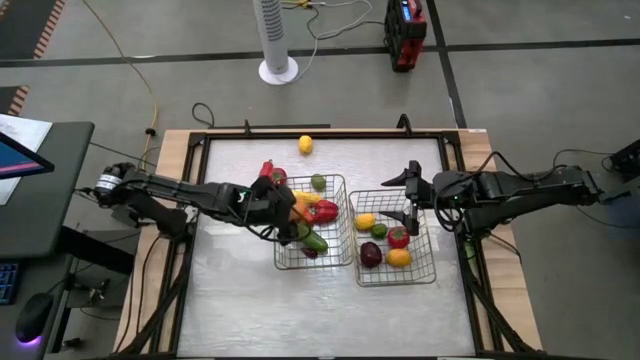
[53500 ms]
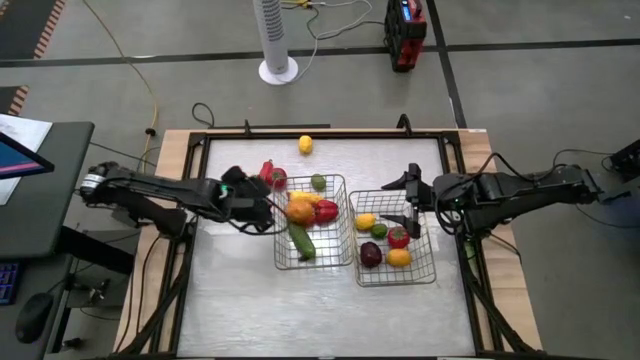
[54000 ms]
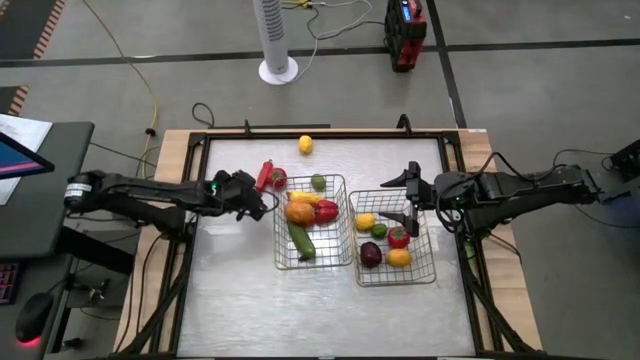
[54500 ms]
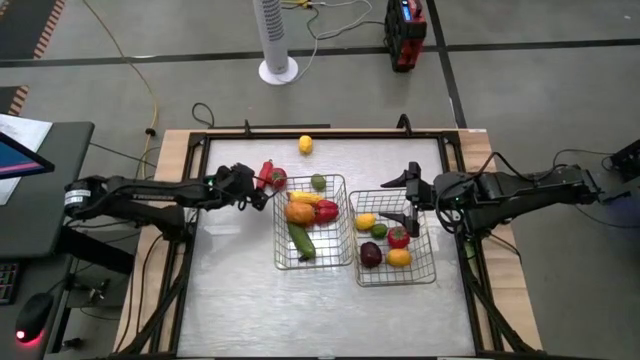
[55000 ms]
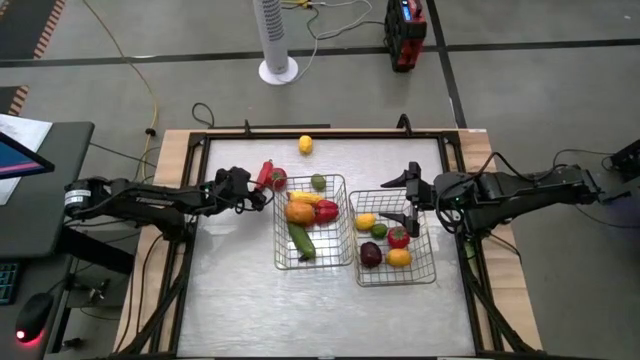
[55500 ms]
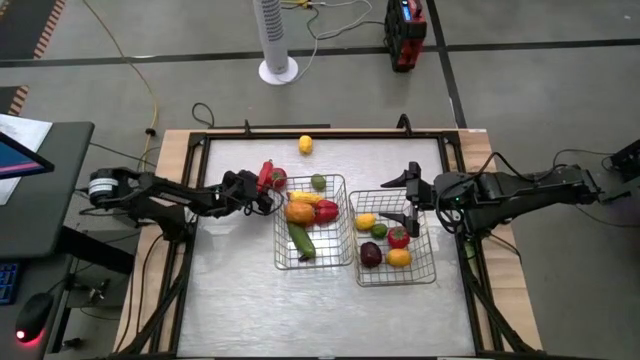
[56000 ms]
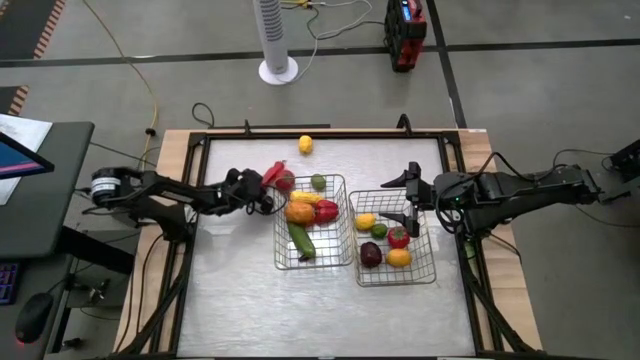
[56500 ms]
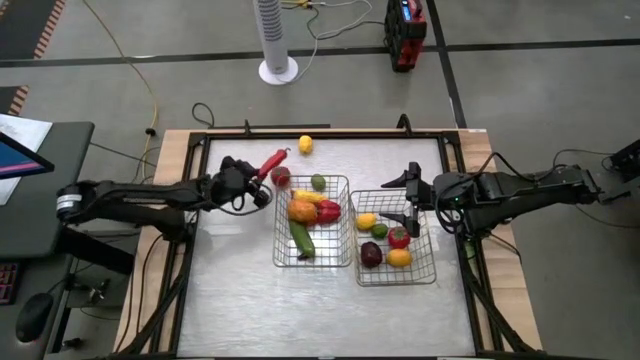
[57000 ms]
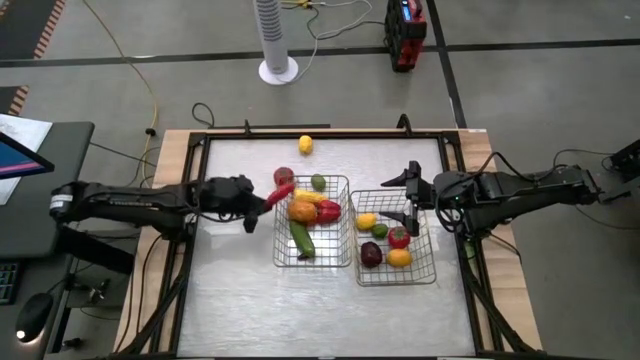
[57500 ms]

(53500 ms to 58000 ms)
Task: Sort produce into baskets
Put the red chili pepper into the left wire basket

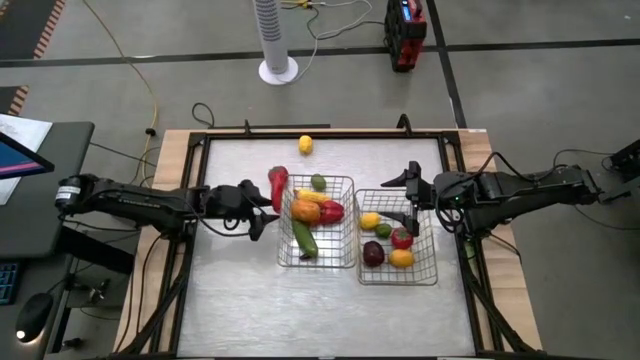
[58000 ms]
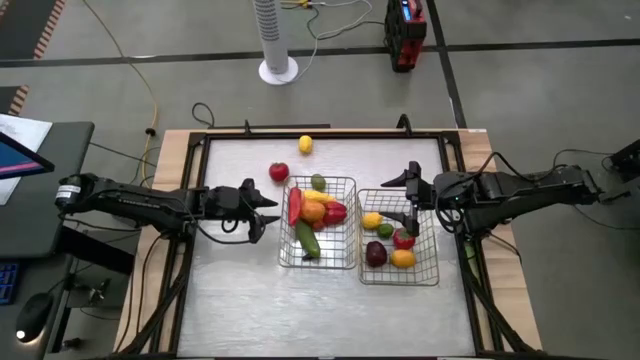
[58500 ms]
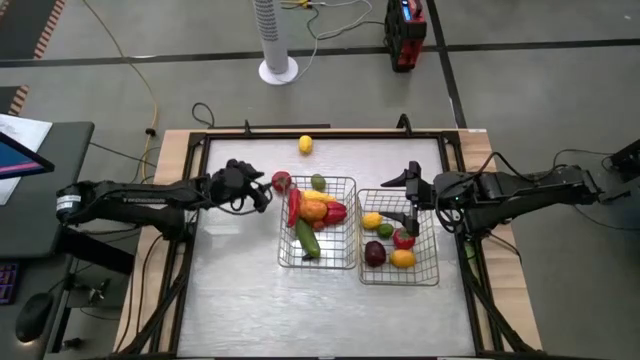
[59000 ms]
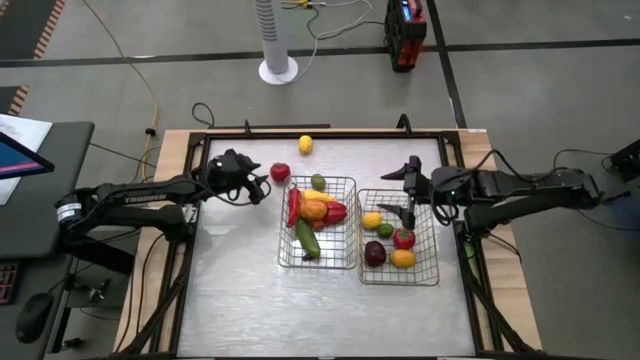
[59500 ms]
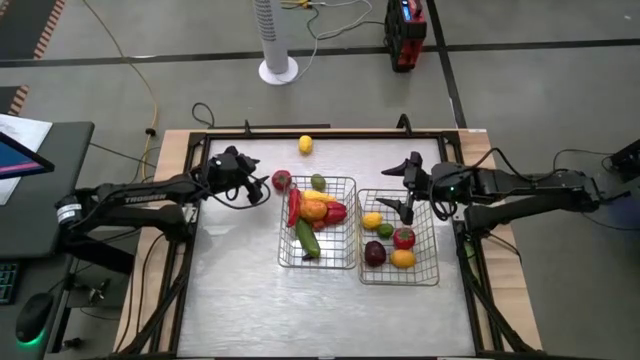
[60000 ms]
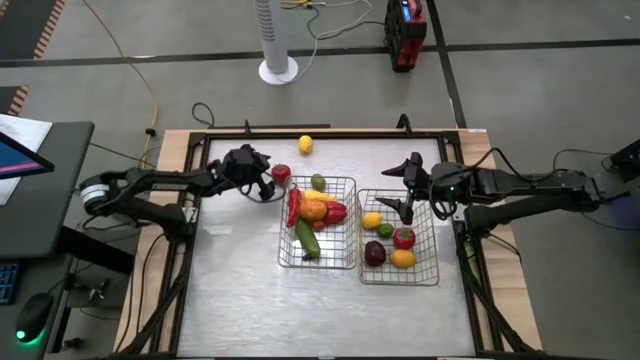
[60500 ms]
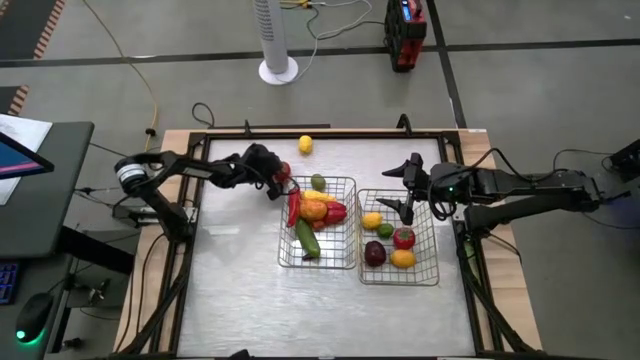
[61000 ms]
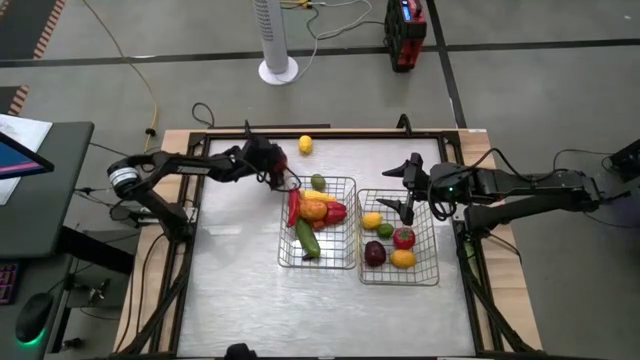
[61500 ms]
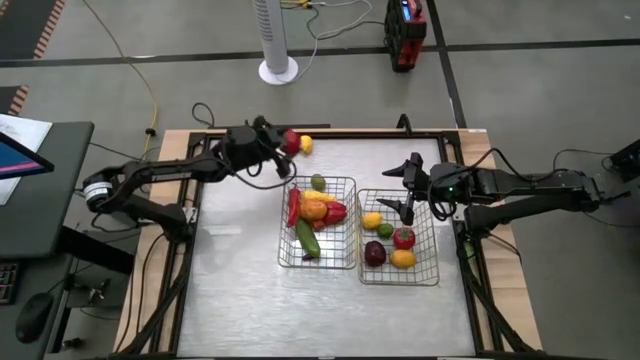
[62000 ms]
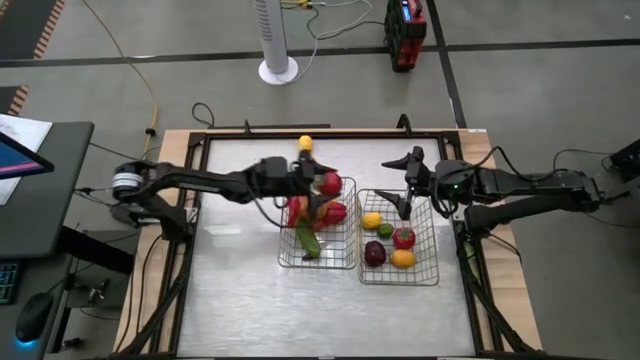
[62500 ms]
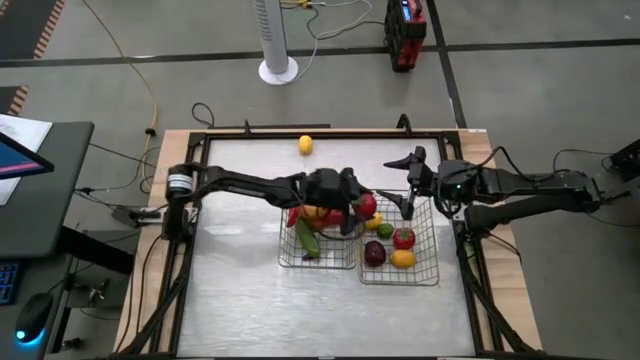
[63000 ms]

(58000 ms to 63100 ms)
Put the tomato into the left wire basket

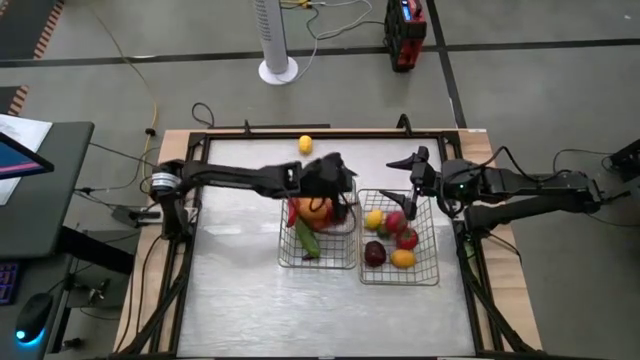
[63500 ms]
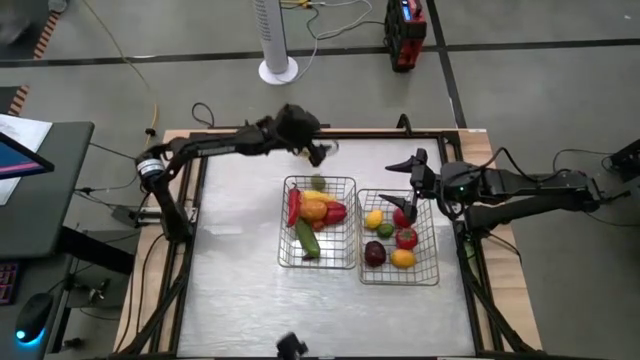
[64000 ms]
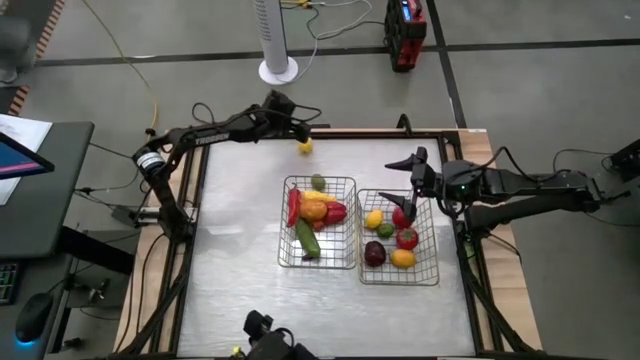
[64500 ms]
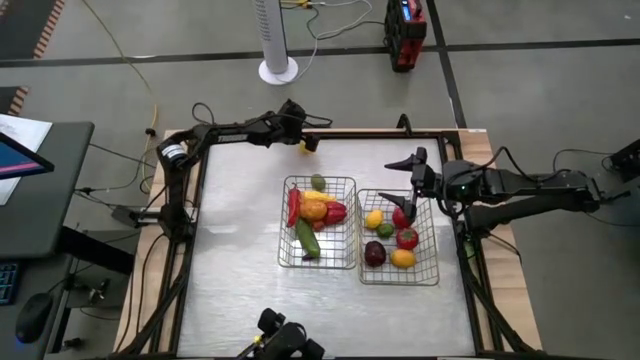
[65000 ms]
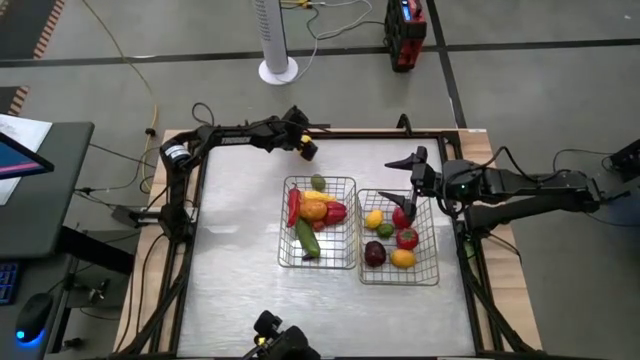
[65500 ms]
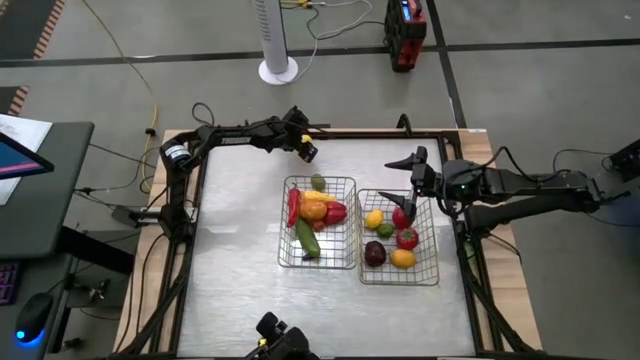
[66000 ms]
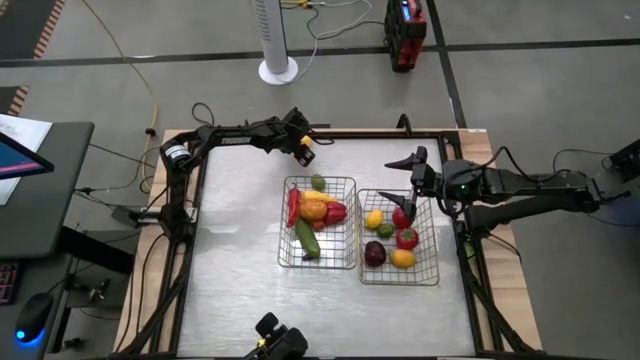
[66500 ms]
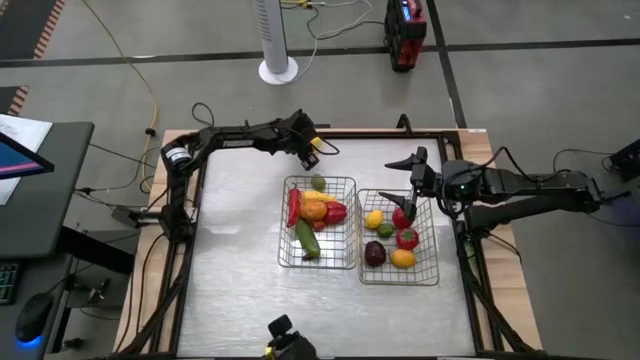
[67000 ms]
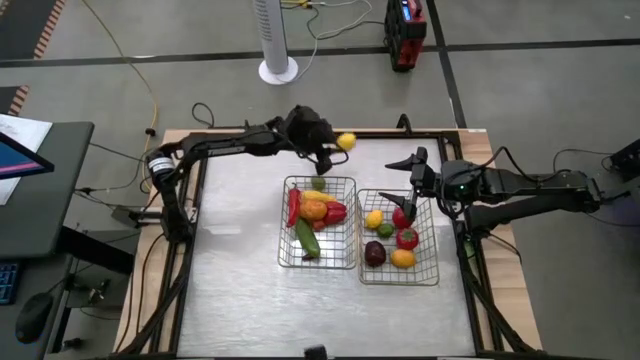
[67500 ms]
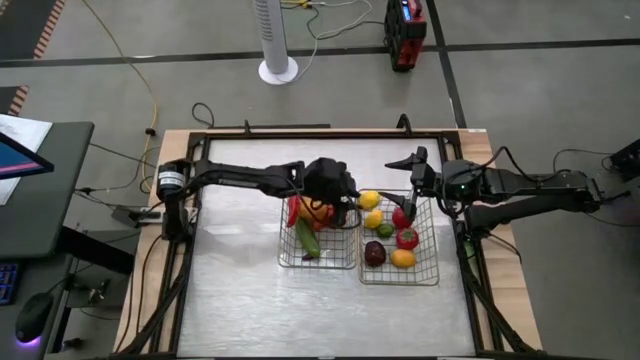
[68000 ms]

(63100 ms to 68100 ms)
Put the lemon into the right wire basket

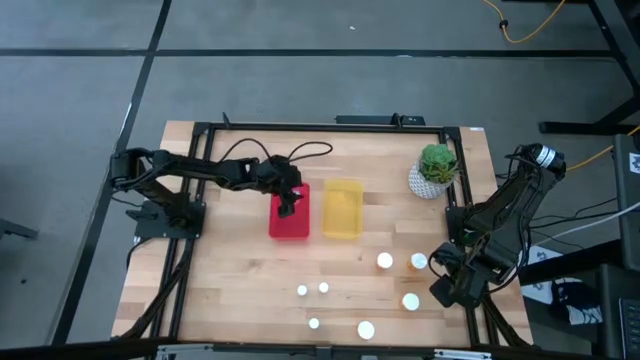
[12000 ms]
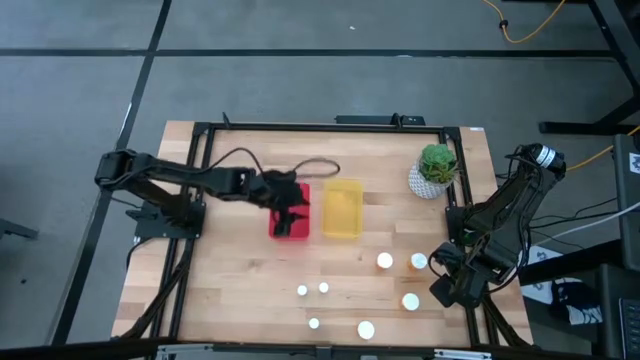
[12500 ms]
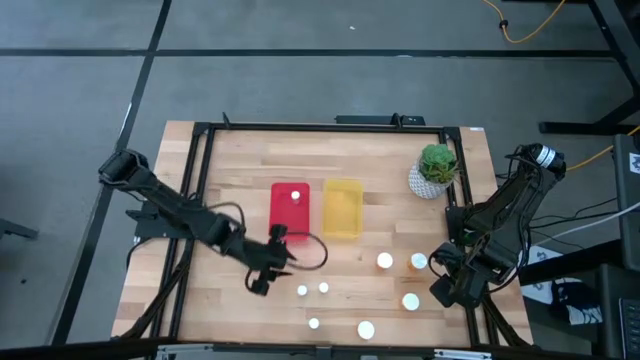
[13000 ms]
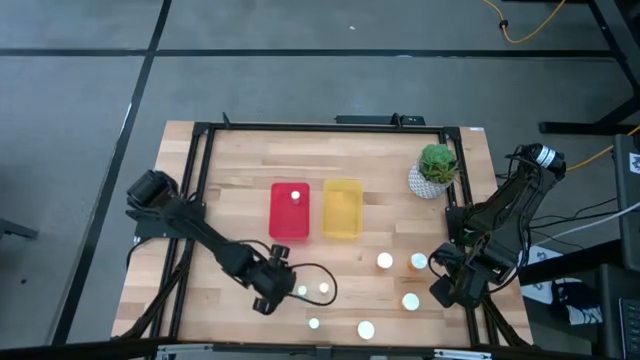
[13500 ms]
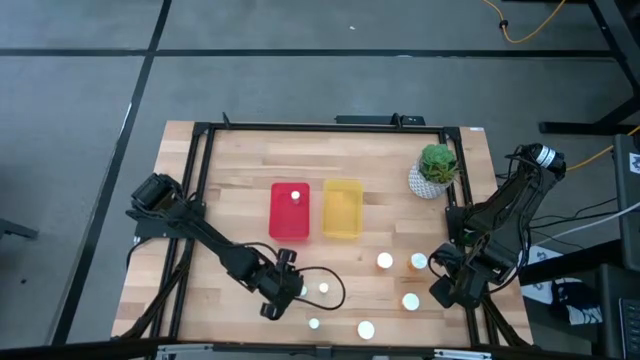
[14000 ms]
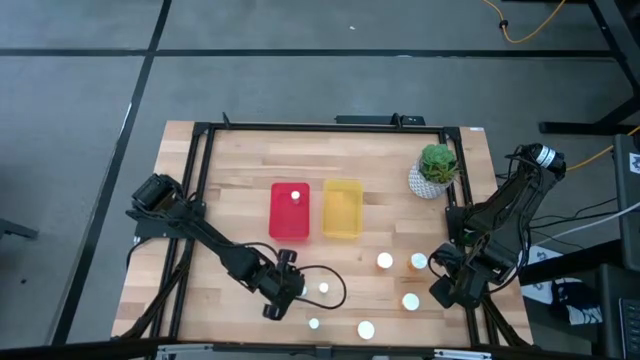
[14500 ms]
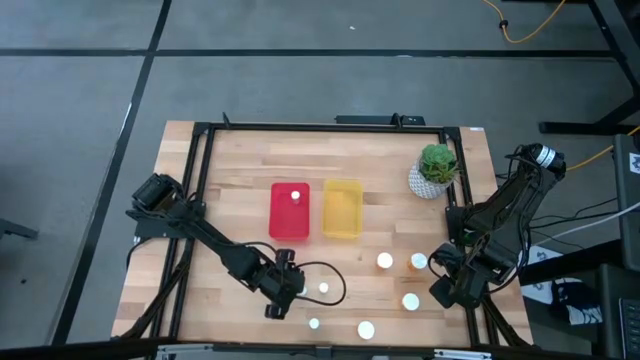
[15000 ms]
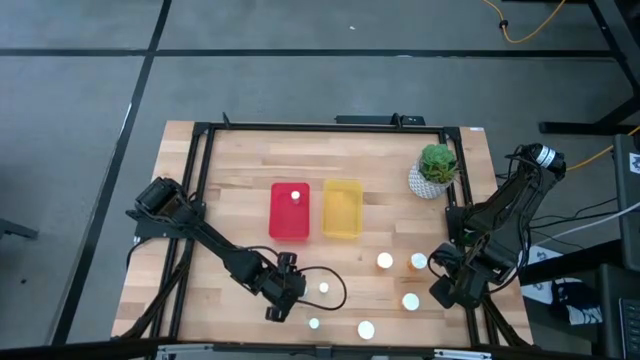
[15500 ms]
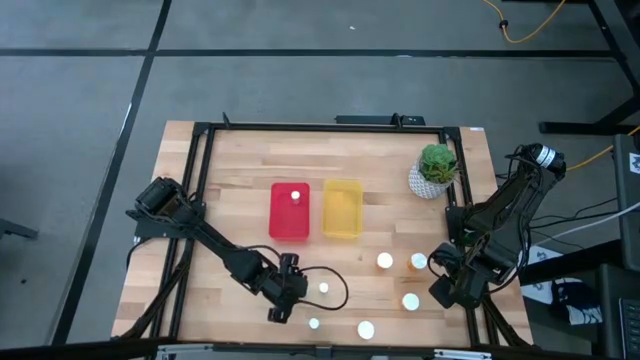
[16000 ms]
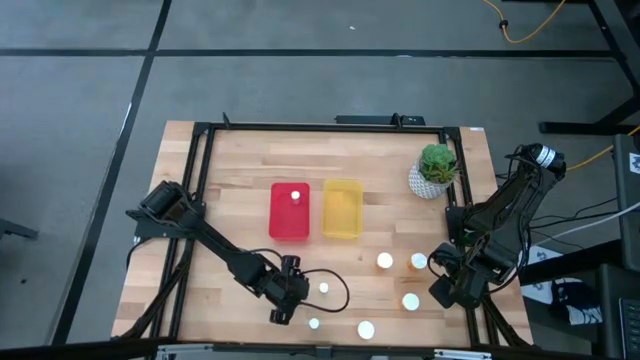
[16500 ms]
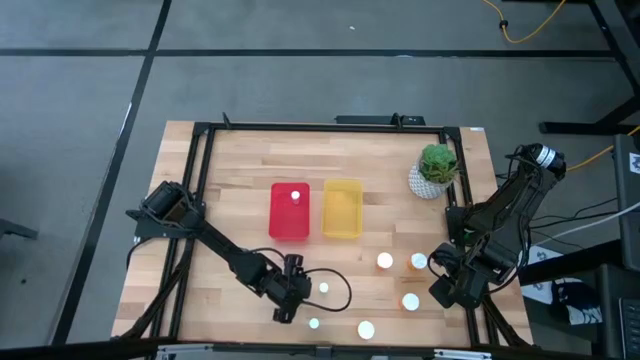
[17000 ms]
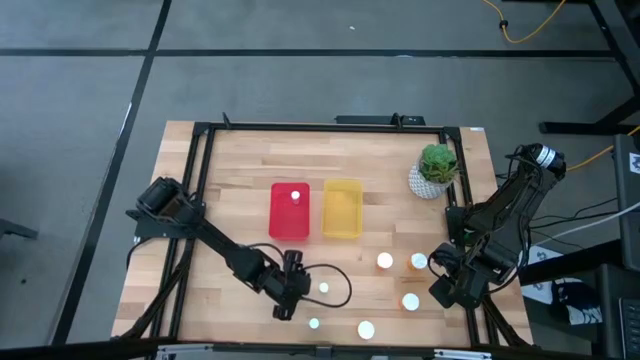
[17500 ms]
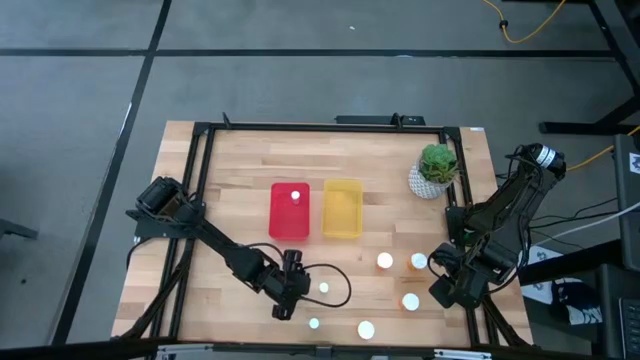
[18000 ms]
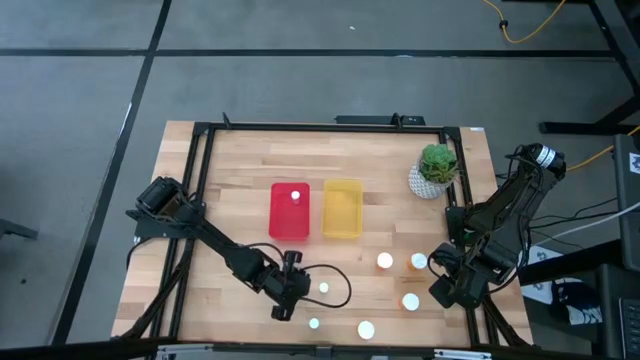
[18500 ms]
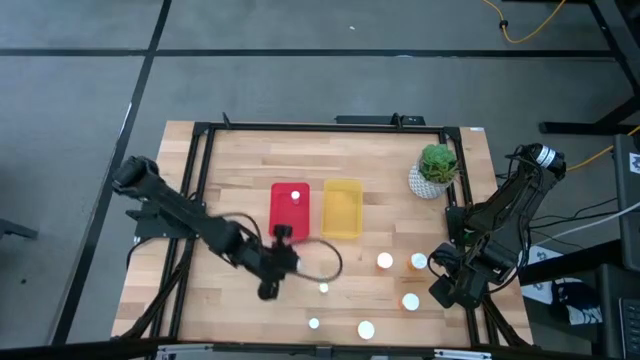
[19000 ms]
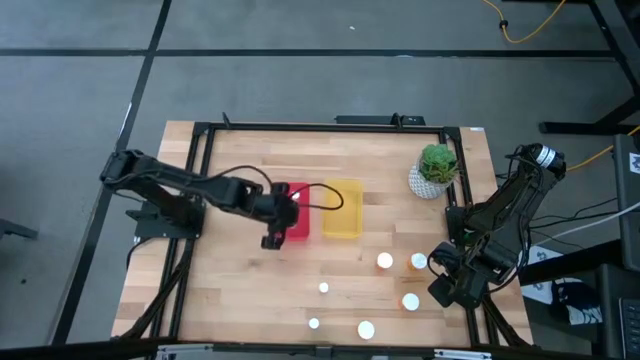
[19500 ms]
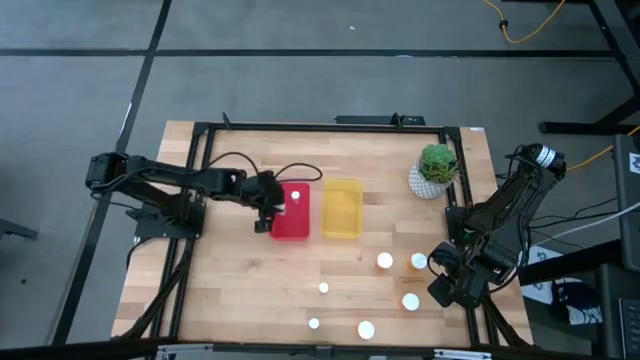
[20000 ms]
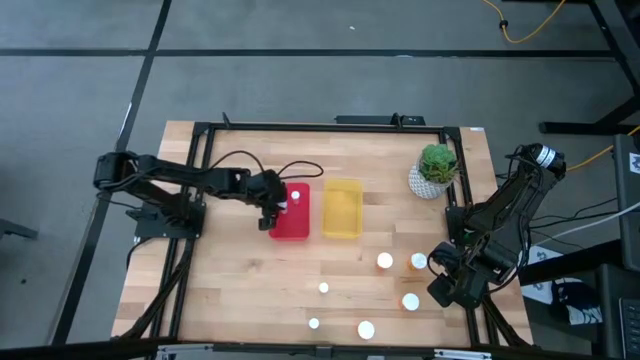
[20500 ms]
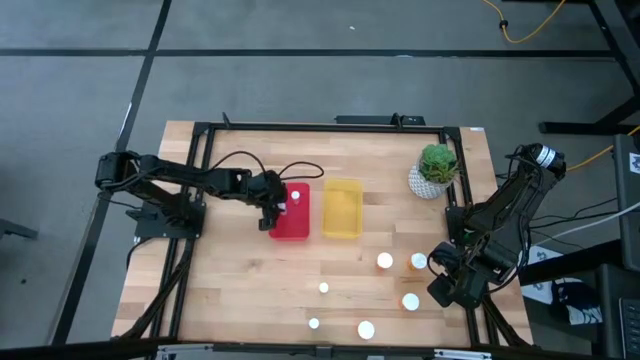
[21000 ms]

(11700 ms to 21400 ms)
Task: Pick and place medicine bottles into bin by pill shape (circle, oval)
Put the small blue pill bottle into the red bin
